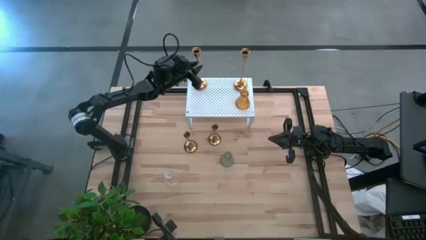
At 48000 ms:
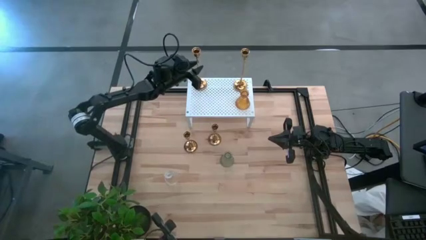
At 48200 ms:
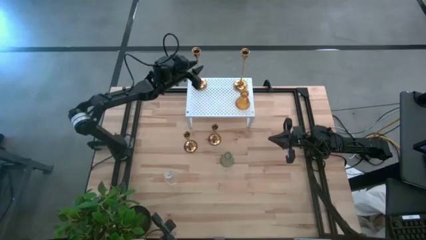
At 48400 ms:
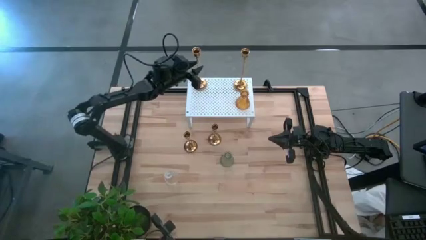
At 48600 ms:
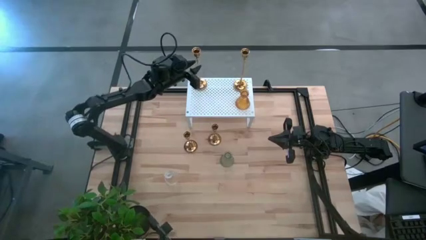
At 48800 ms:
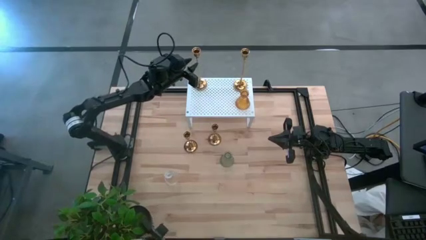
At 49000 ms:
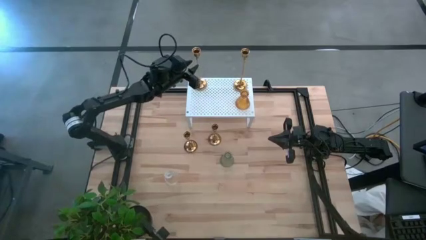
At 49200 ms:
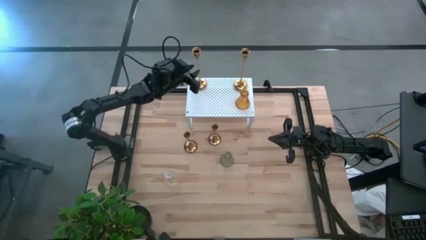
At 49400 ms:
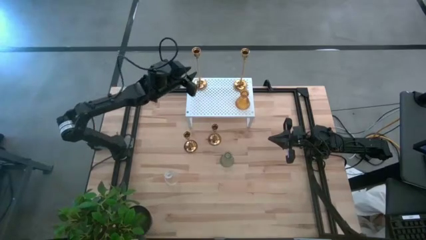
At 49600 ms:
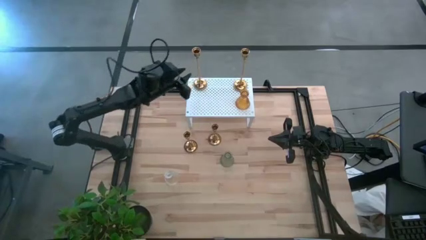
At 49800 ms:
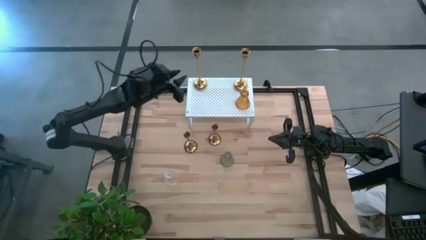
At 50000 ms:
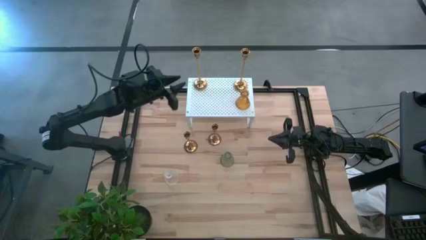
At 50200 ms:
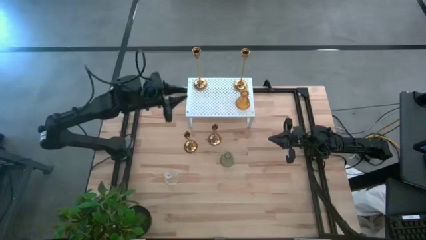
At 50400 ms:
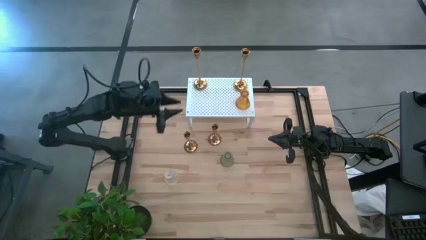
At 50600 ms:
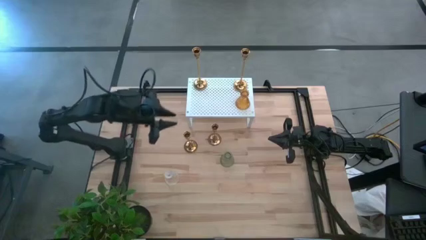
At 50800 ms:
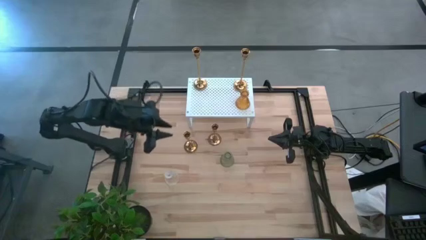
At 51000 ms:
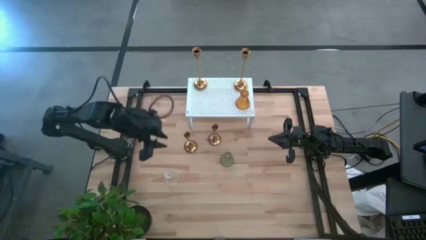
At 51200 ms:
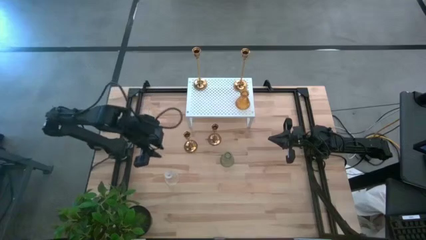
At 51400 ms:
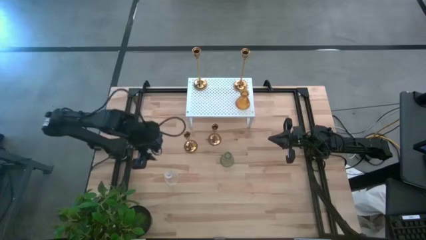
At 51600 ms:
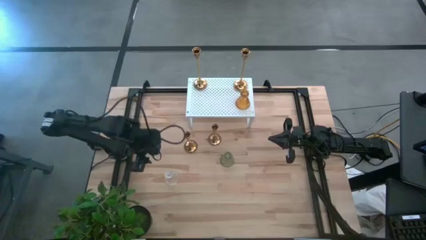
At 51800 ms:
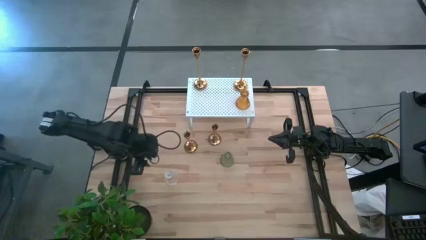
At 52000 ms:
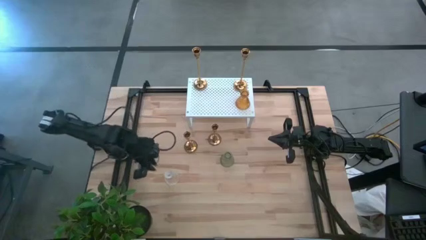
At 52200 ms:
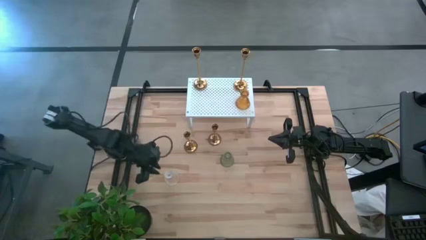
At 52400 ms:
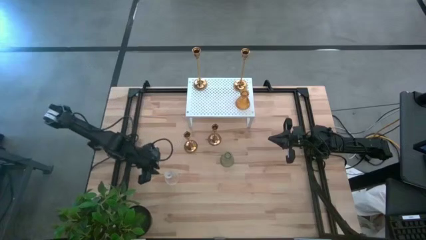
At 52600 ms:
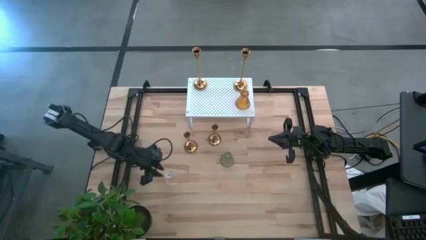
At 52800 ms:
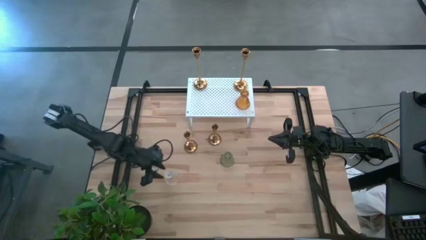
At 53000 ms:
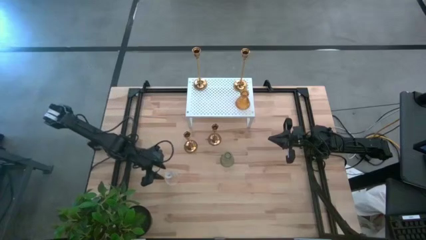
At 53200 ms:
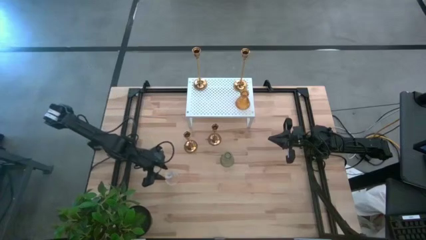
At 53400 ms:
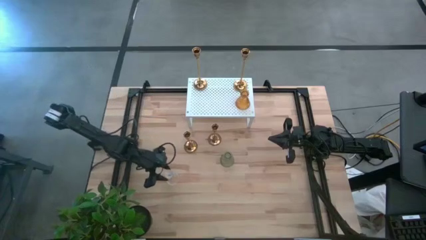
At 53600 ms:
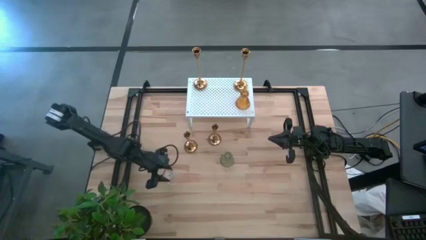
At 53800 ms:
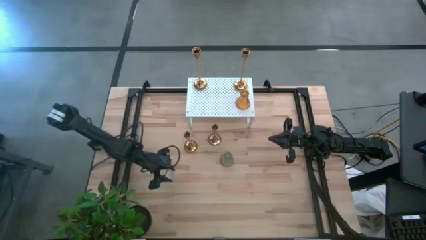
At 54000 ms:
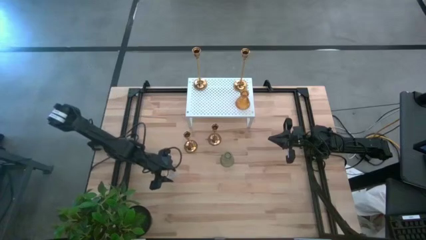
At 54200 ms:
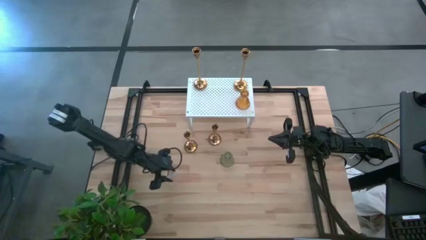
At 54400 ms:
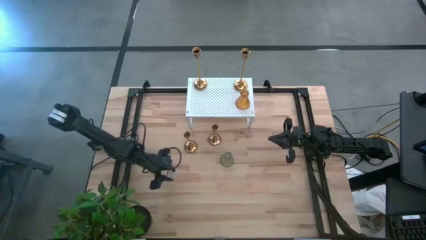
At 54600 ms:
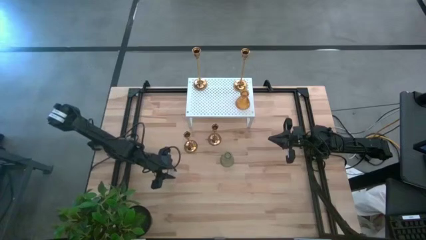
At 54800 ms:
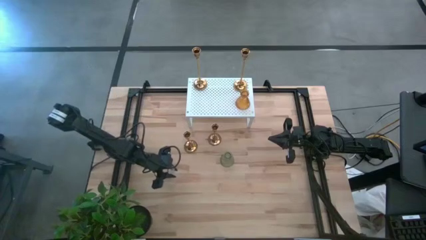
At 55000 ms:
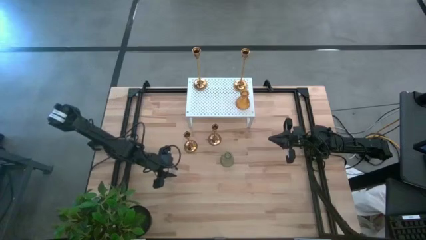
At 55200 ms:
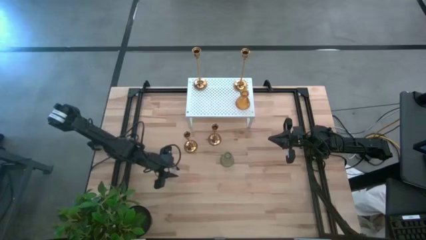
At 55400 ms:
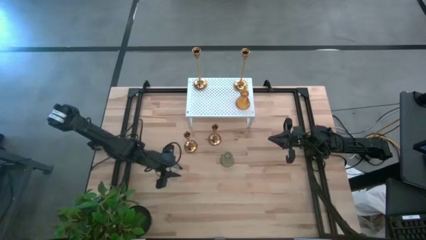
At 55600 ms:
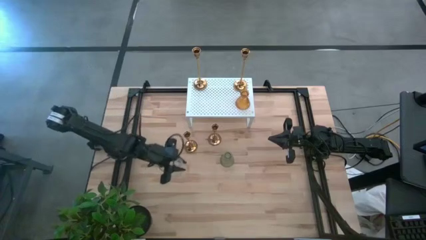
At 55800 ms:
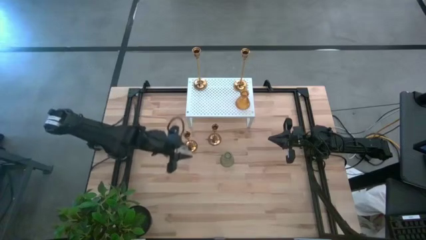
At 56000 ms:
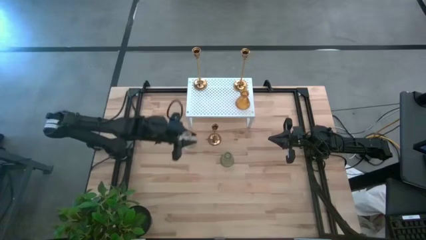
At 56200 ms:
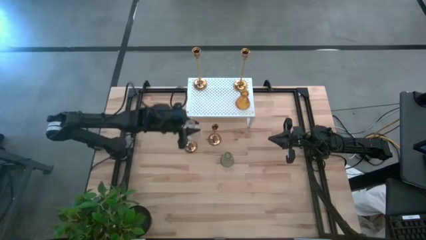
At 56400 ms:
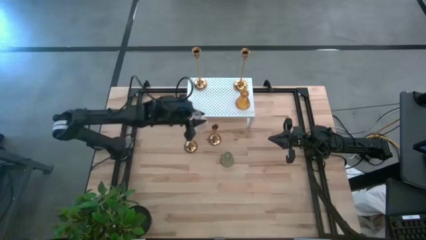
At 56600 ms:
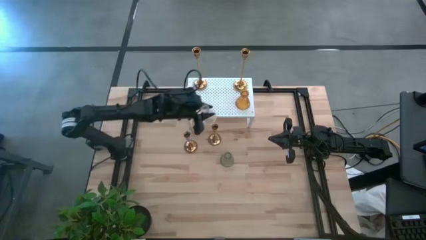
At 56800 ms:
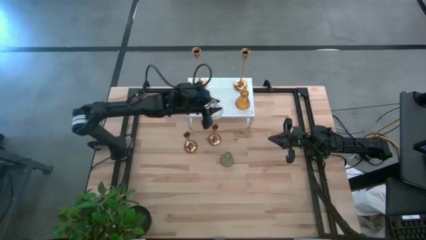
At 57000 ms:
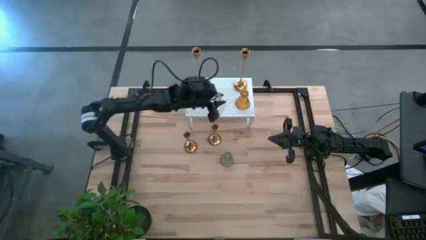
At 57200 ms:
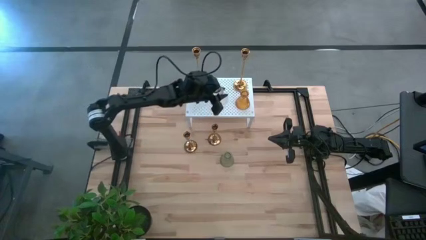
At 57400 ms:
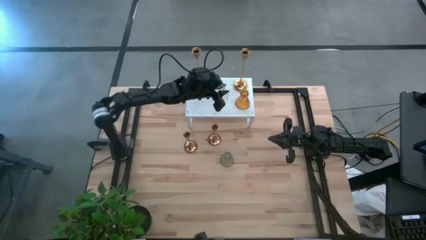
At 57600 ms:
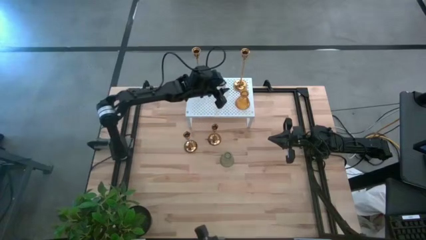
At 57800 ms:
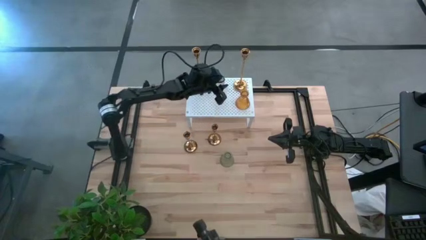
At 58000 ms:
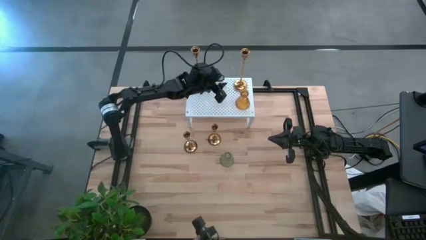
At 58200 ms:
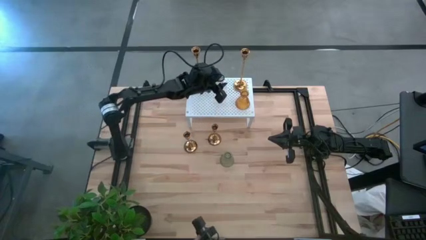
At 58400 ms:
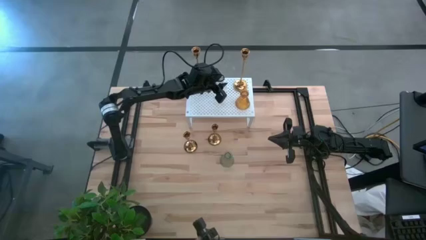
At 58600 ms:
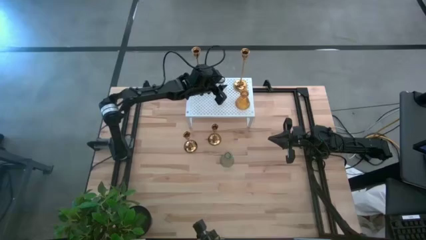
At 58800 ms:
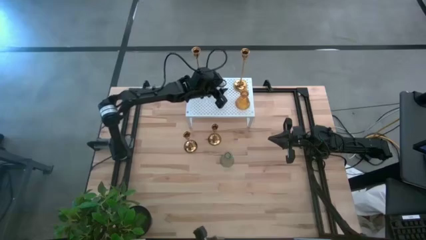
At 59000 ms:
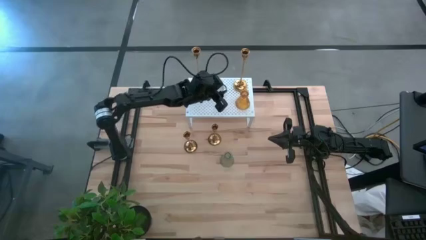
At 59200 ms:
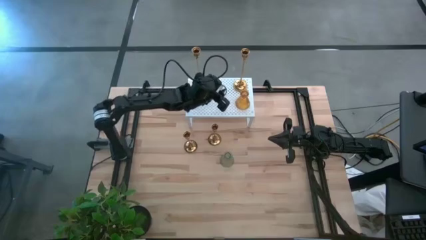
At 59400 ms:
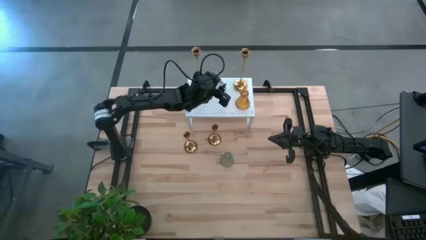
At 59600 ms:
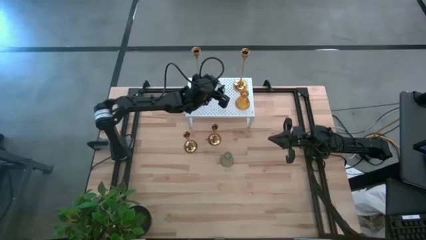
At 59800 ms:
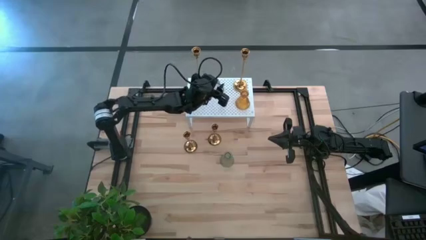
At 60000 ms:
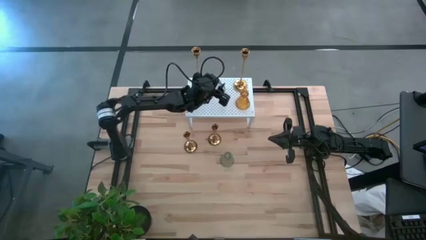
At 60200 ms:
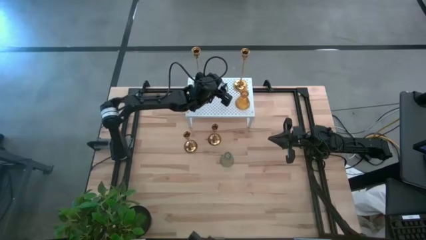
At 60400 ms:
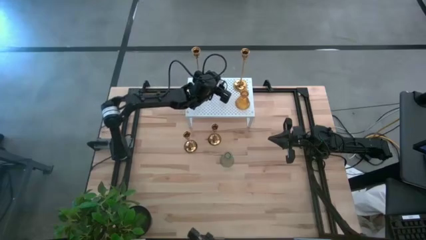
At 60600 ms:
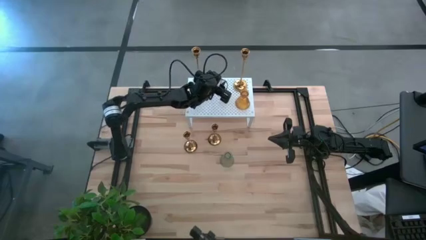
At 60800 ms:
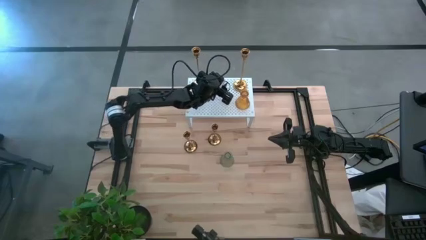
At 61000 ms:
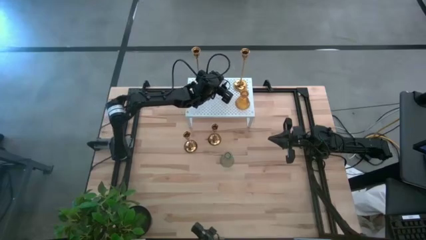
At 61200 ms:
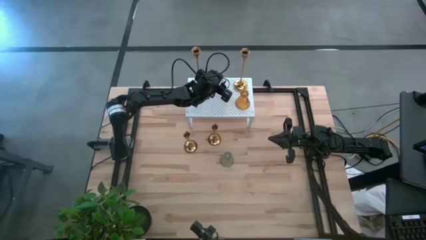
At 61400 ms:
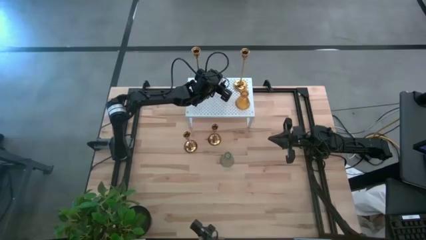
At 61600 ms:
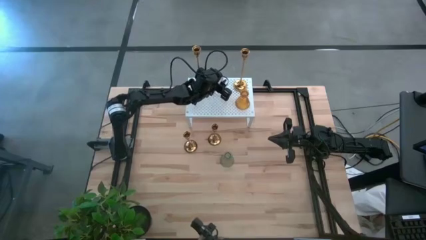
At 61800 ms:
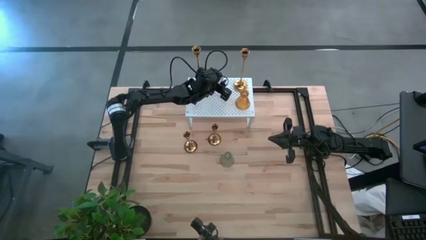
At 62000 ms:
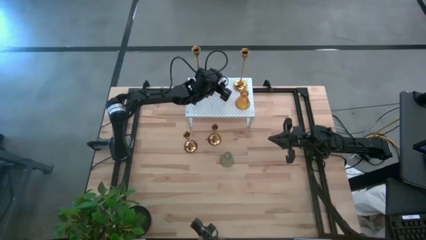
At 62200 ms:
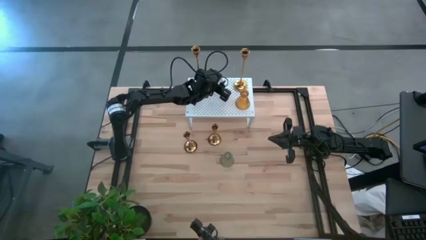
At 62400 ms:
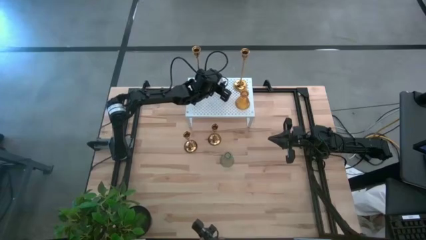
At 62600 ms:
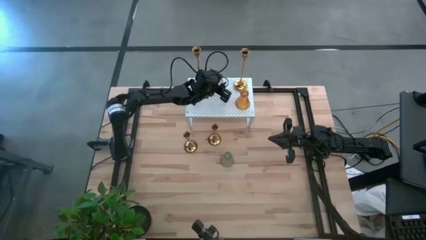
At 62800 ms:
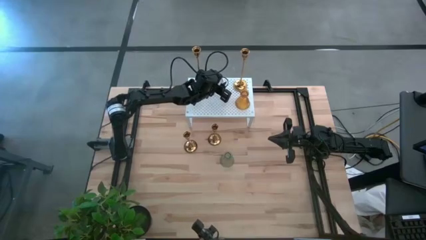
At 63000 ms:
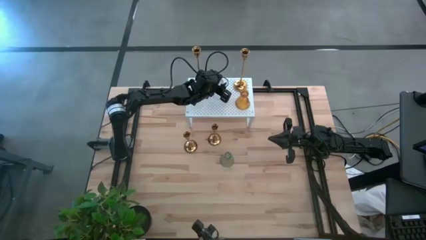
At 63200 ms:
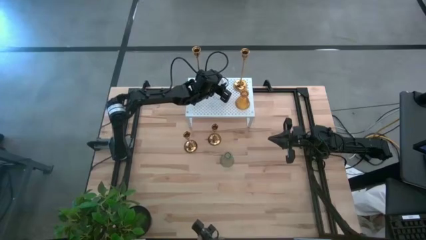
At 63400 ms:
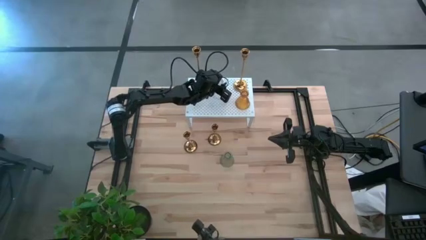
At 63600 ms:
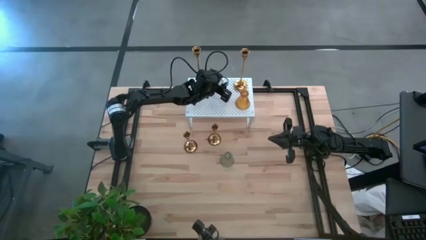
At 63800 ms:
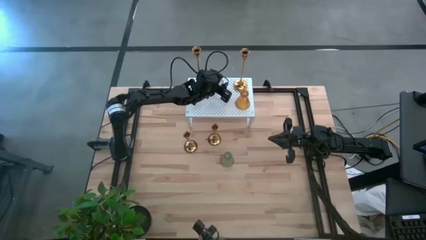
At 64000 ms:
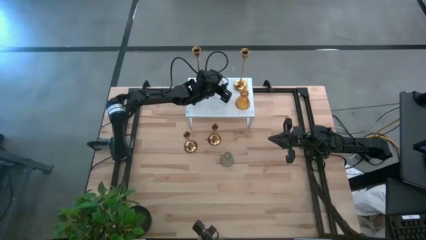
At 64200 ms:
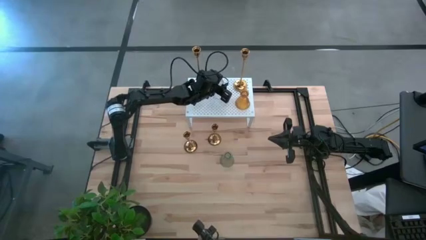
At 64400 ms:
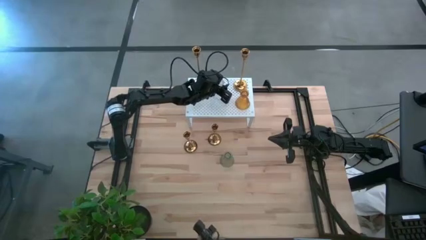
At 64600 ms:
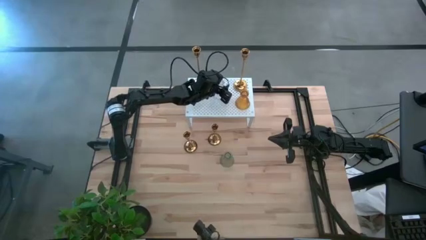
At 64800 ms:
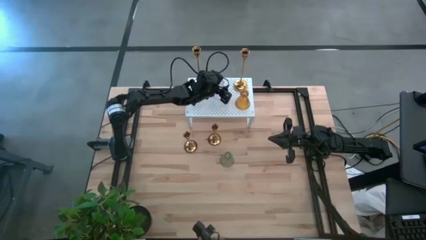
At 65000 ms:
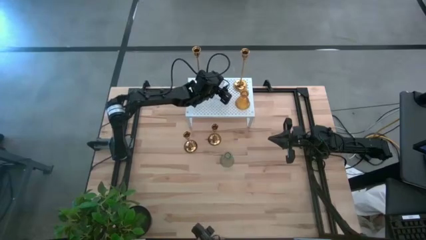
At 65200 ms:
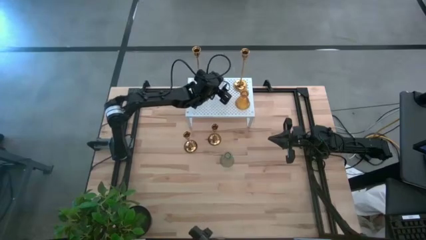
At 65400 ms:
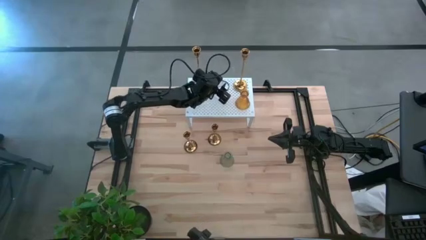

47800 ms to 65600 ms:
Task: Pick & Place candle stick holders
Put the transparent glass candle holder on the shelf
